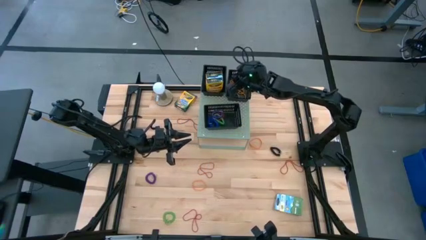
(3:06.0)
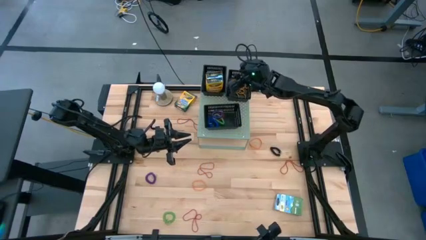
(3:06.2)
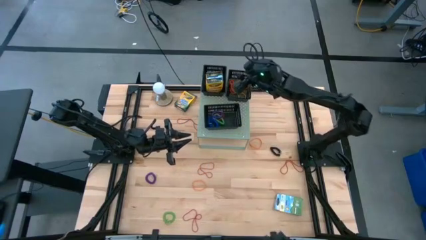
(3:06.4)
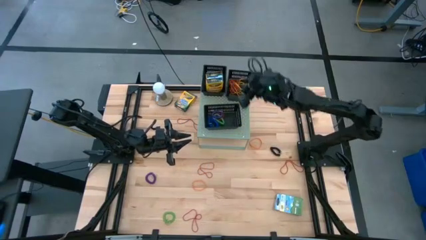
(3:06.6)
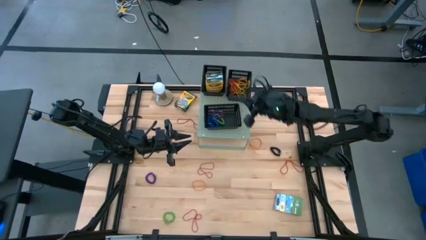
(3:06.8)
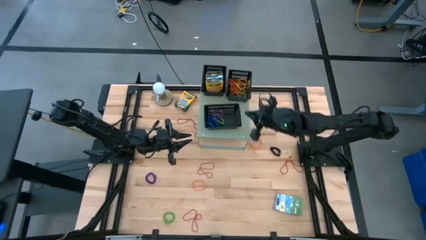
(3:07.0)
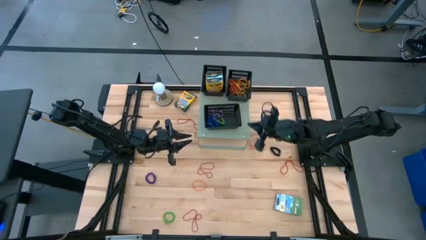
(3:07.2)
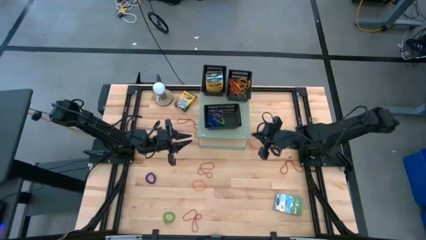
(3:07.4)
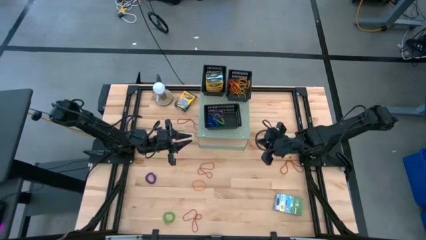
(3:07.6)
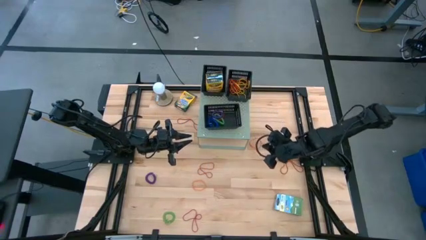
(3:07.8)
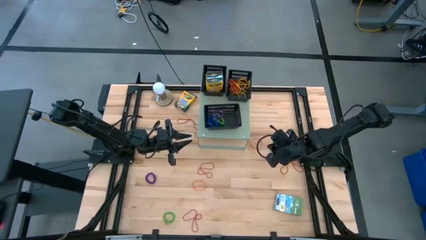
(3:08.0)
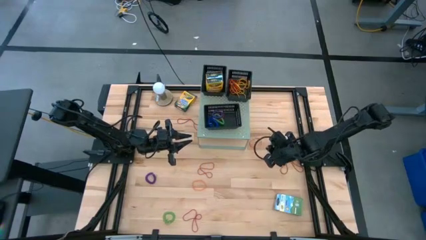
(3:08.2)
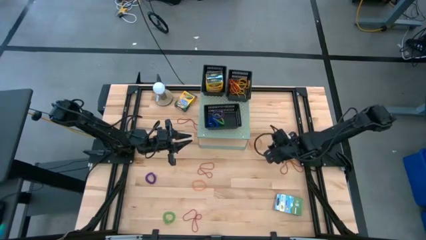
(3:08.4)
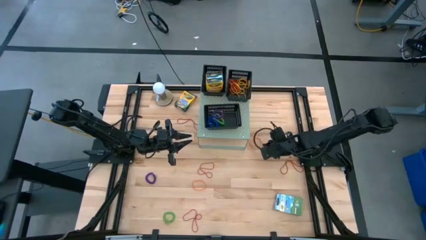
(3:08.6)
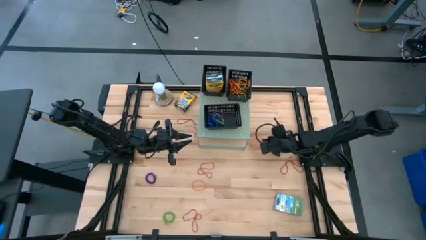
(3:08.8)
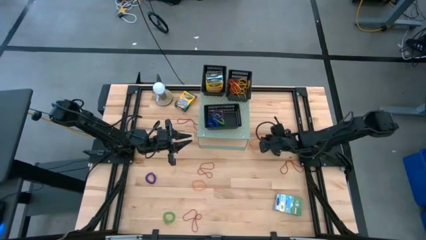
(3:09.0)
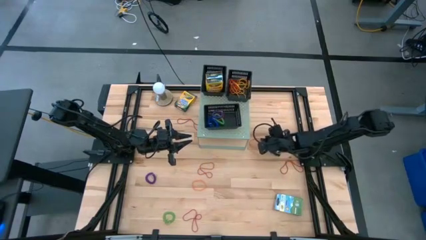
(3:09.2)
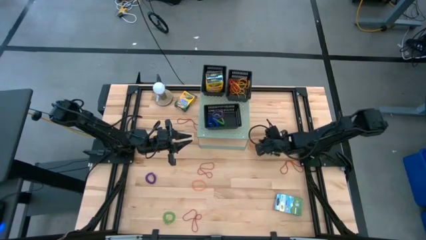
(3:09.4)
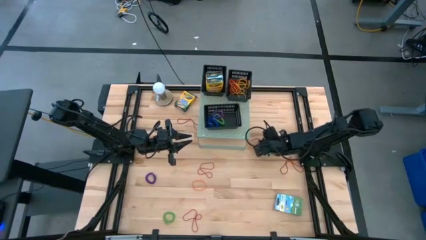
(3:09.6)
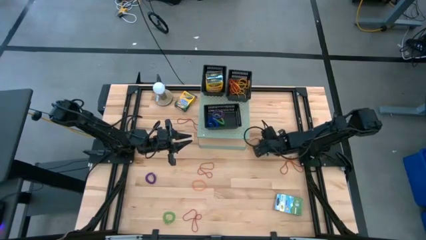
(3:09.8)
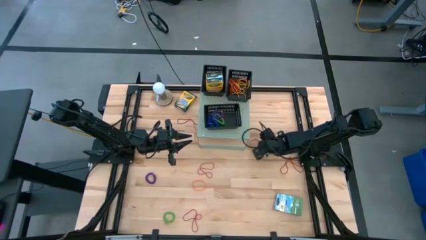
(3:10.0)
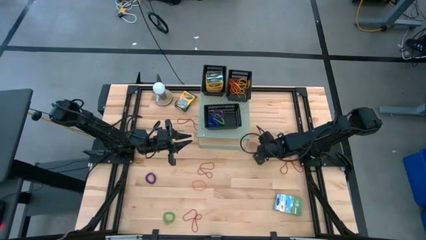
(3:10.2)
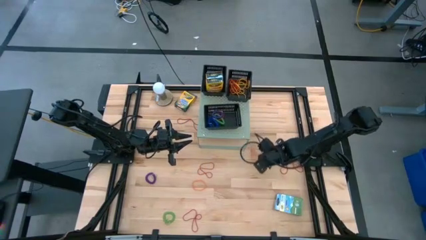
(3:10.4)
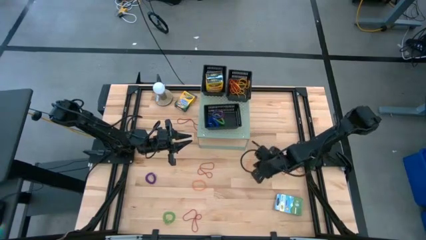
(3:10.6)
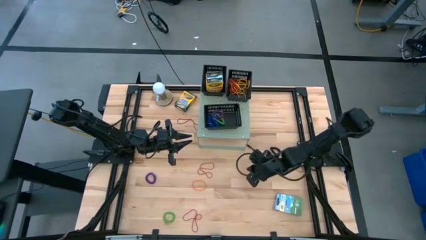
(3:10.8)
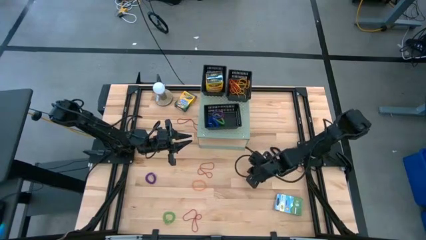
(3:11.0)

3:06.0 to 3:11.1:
Task: Pick & Place Office Desk Supplies
Put the orange rubber band into the top right black bin on the shelf

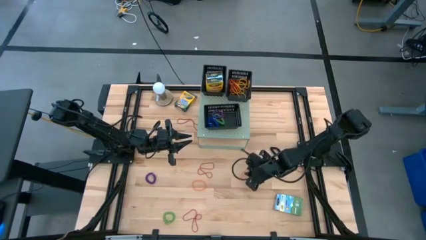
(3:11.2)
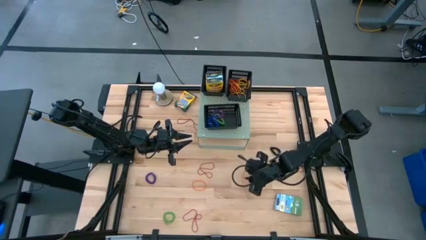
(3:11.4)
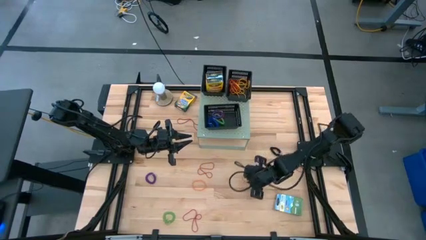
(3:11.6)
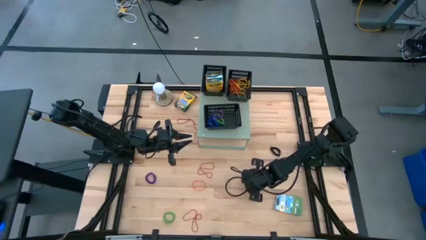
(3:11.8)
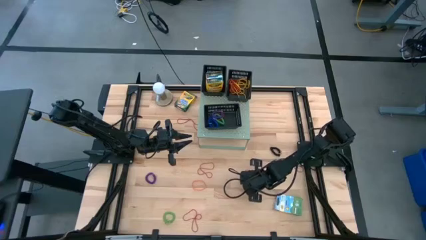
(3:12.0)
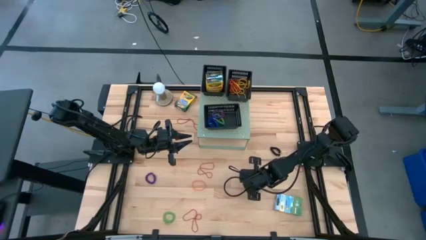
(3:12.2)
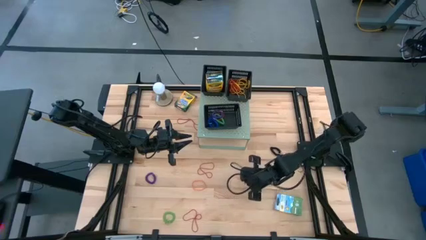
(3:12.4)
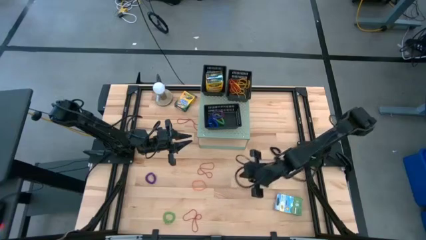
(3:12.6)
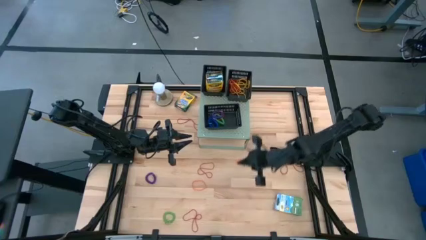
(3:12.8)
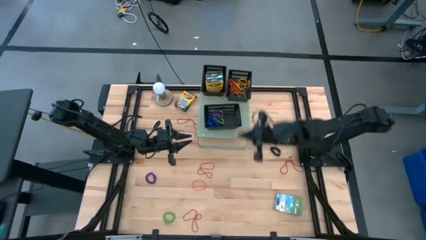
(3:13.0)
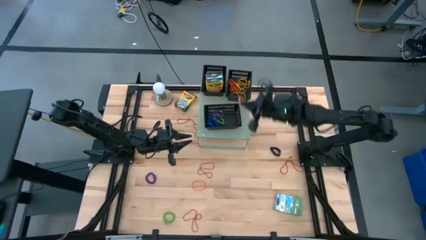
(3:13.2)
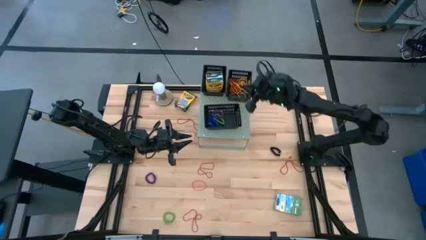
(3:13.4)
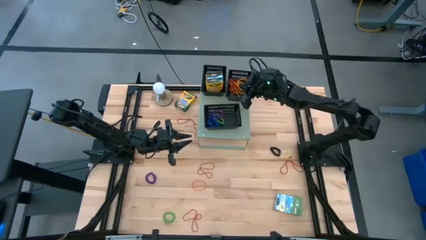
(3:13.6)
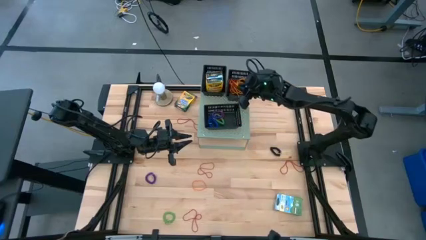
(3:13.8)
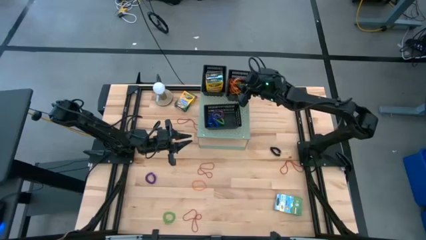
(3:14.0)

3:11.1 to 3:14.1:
Put the orange rubber band into the top right black bin on the shelf

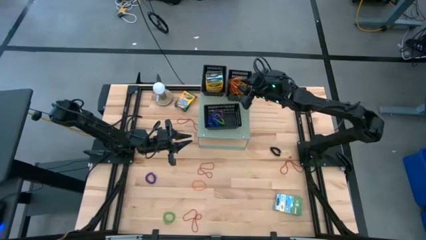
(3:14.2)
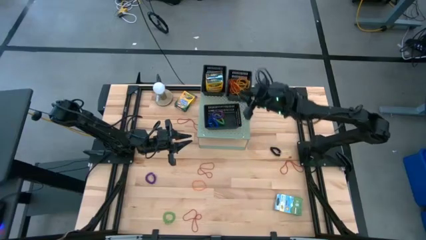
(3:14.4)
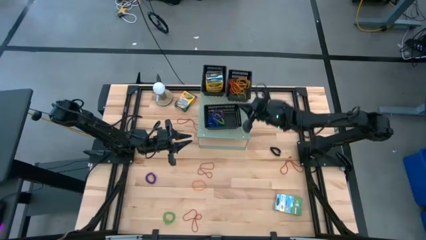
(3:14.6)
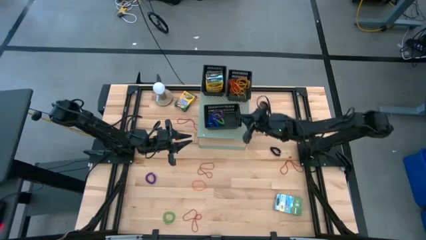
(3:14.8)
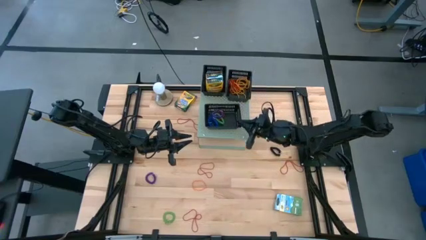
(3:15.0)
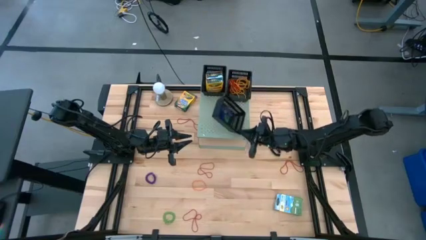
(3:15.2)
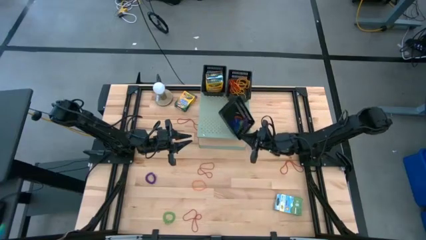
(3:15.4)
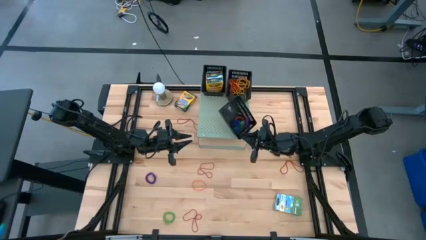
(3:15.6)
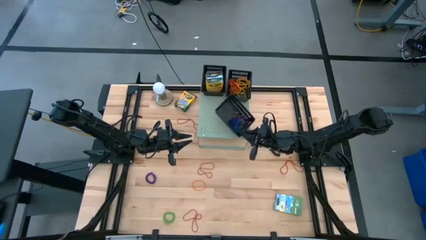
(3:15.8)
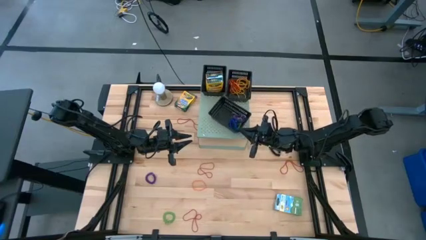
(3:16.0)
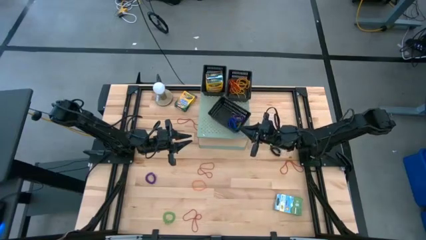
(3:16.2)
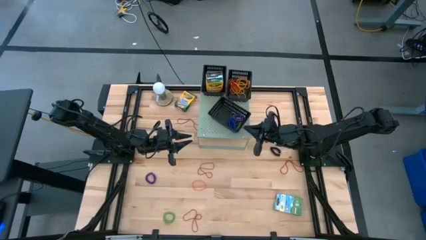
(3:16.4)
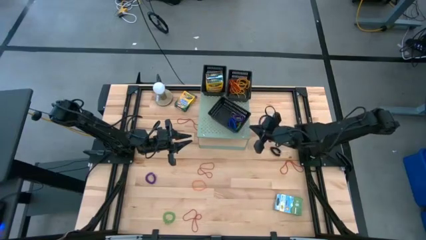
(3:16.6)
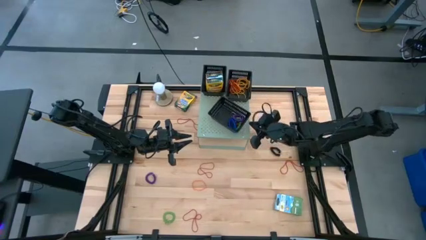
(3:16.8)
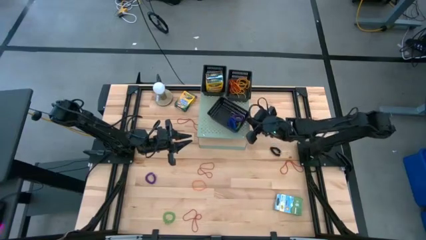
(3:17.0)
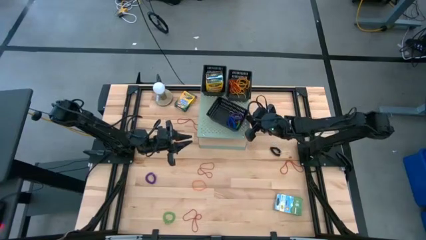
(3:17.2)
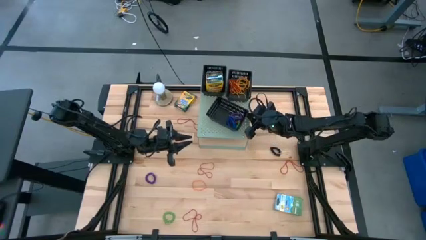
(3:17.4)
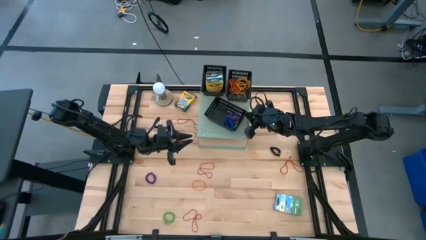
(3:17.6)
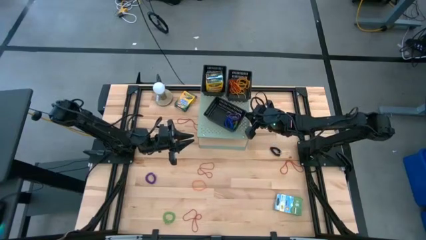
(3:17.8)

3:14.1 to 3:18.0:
Adjust the bottom black bin on the shelf

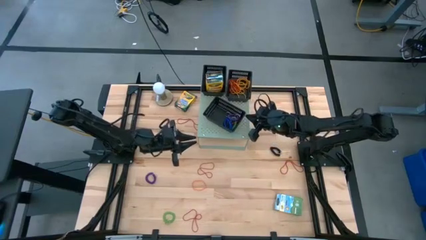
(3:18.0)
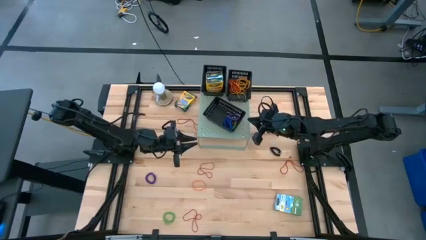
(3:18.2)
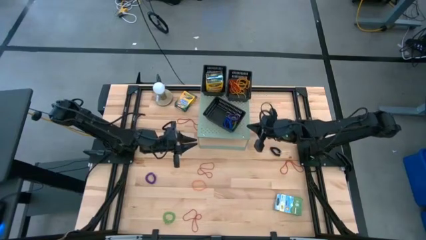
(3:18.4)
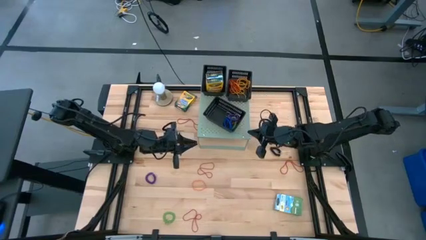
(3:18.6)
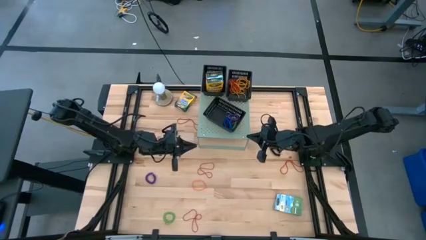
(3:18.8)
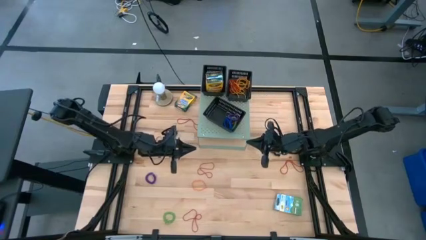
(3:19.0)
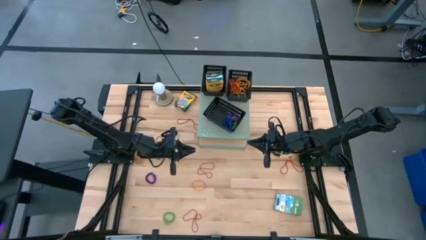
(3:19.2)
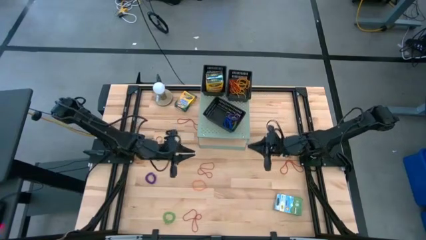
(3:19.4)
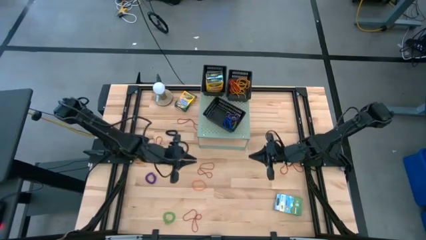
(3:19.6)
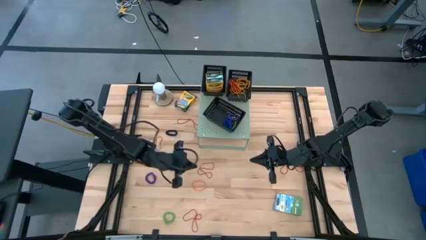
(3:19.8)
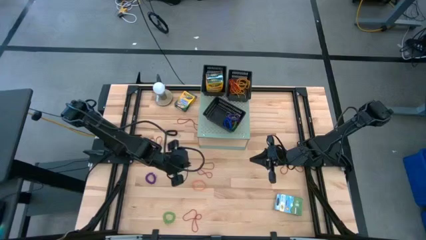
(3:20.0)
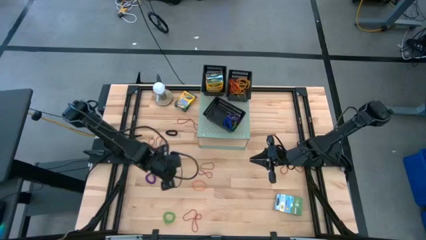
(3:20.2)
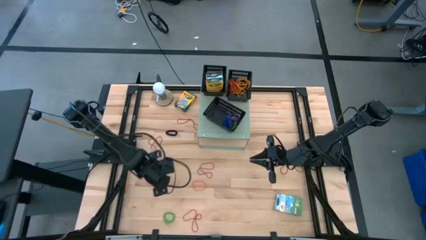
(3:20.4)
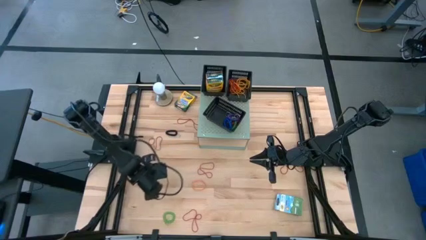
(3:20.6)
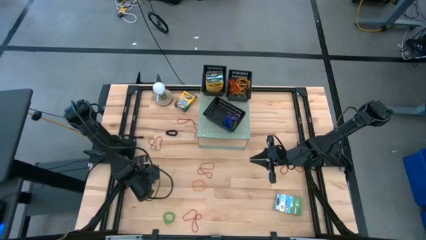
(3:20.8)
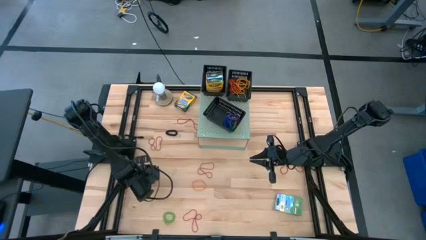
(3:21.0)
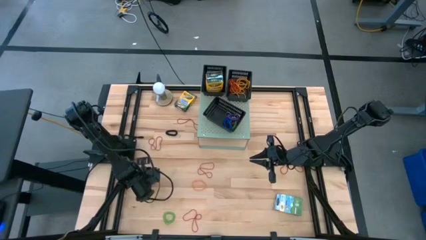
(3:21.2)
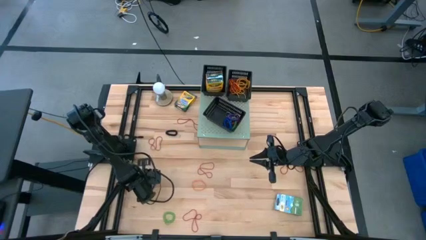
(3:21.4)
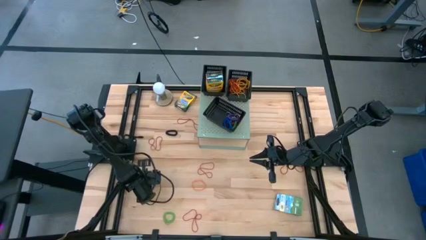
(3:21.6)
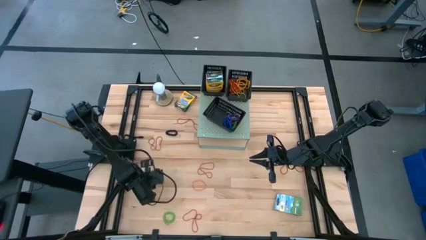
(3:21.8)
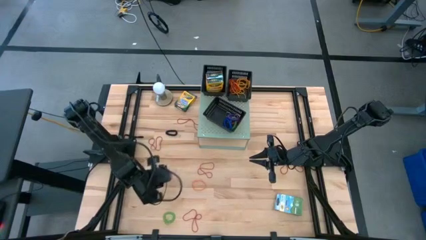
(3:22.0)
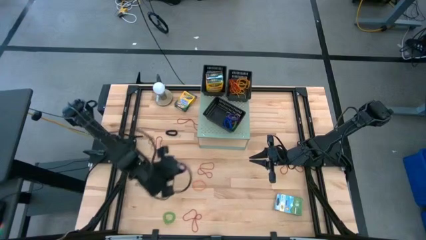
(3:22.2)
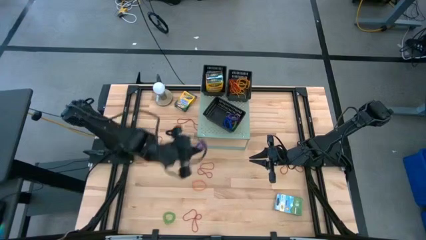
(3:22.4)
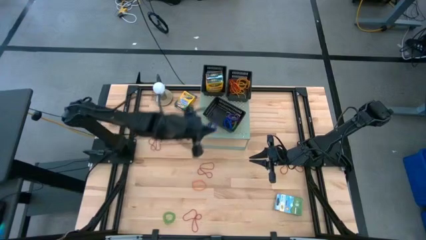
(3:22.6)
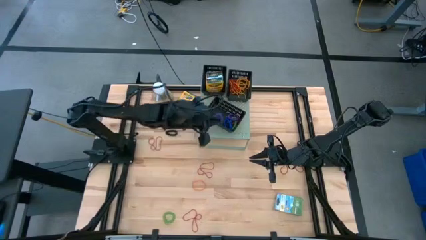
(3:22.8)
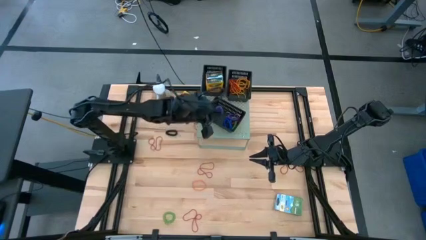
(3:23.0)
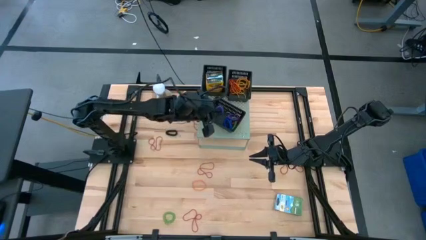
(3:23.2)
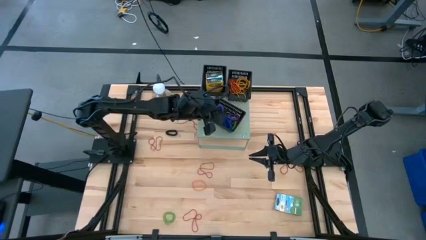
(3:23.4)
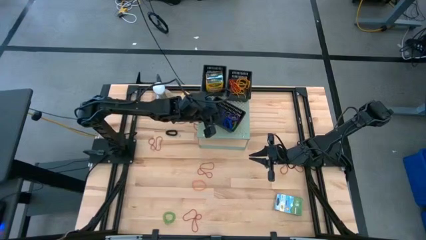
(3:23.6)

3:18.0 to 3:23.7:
Put the violet spring keychain into the bottom black bin on the shelf
